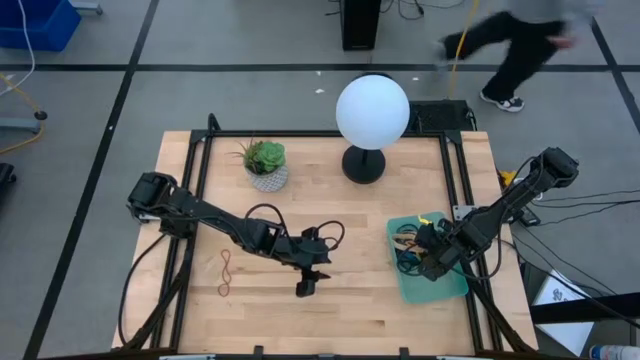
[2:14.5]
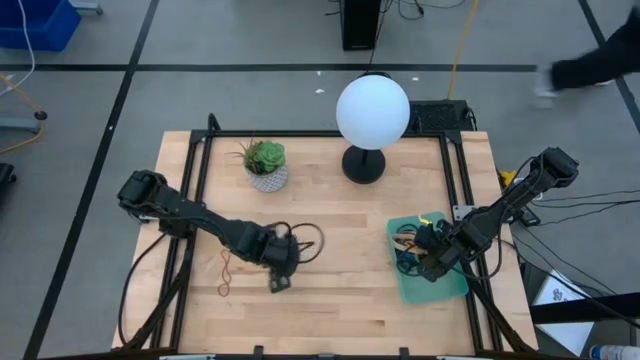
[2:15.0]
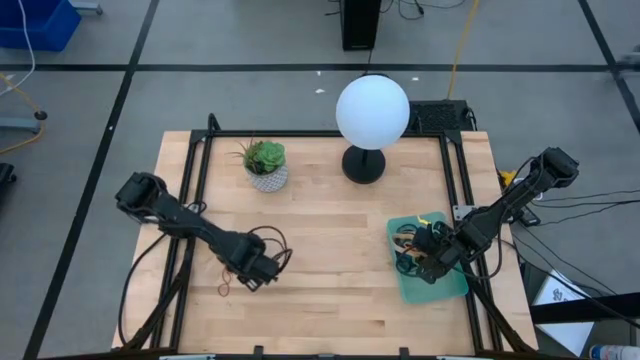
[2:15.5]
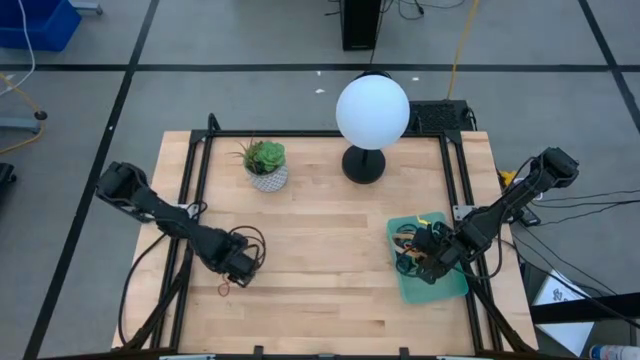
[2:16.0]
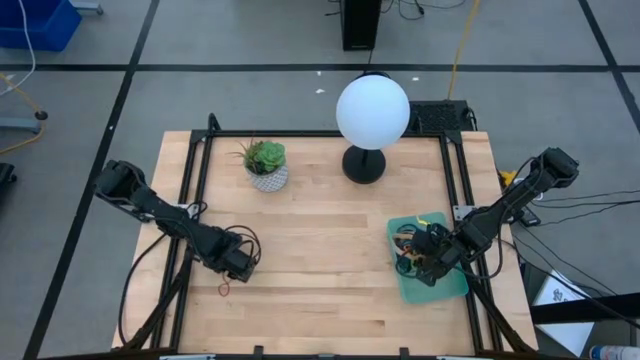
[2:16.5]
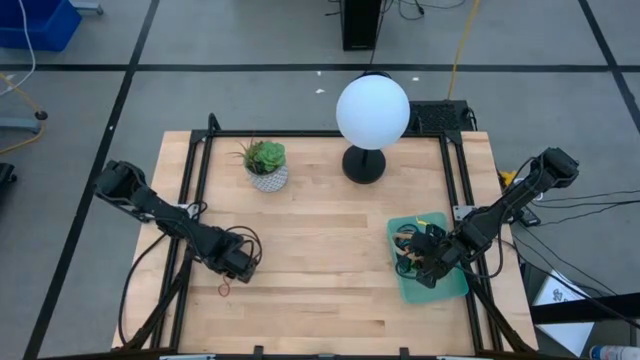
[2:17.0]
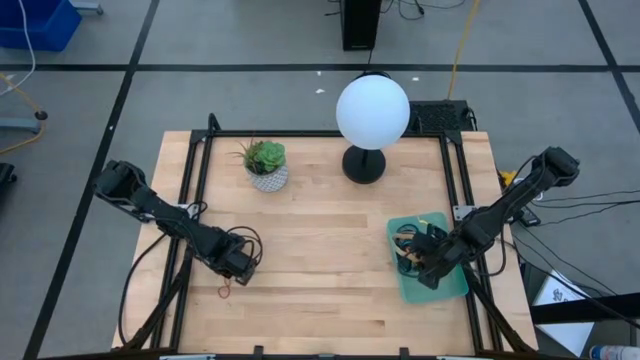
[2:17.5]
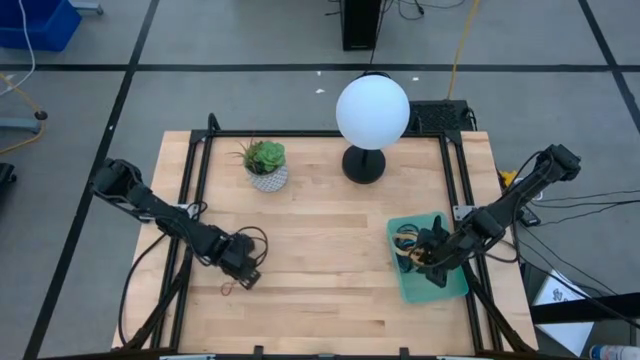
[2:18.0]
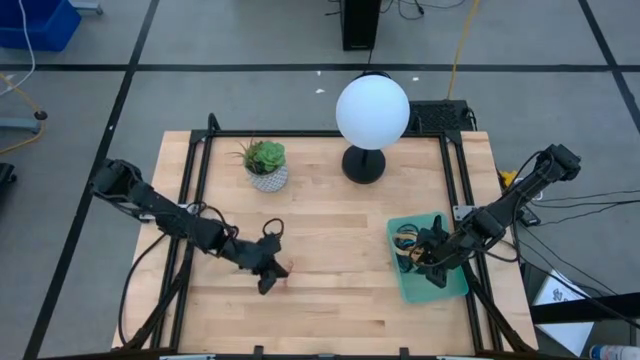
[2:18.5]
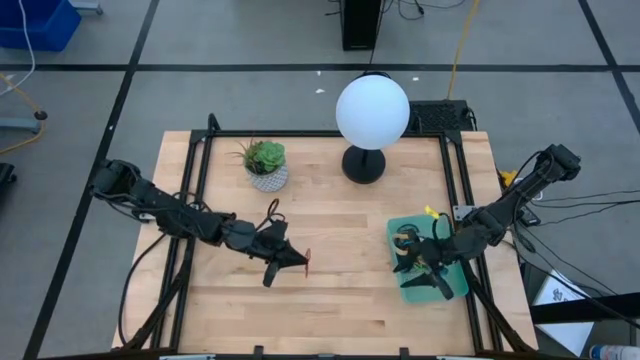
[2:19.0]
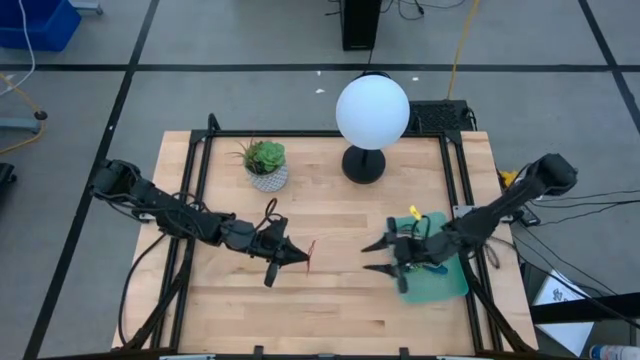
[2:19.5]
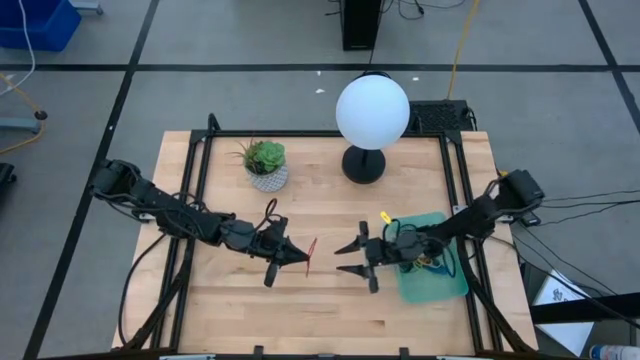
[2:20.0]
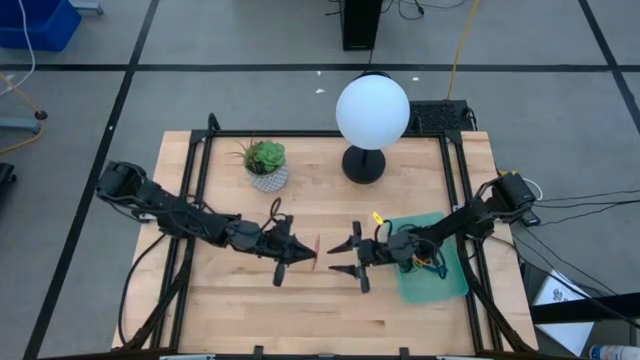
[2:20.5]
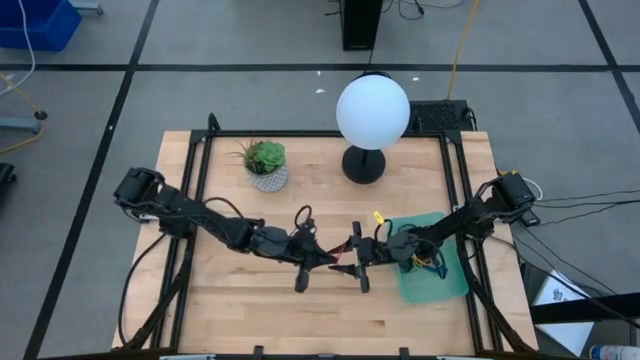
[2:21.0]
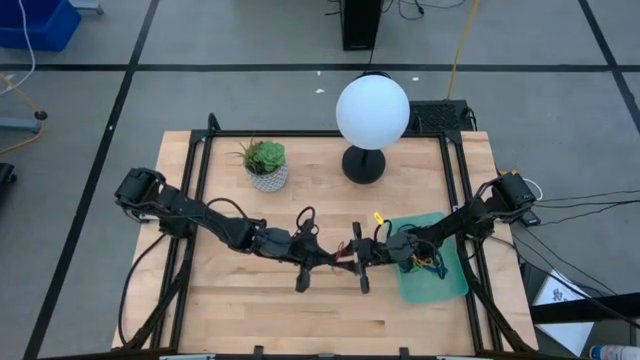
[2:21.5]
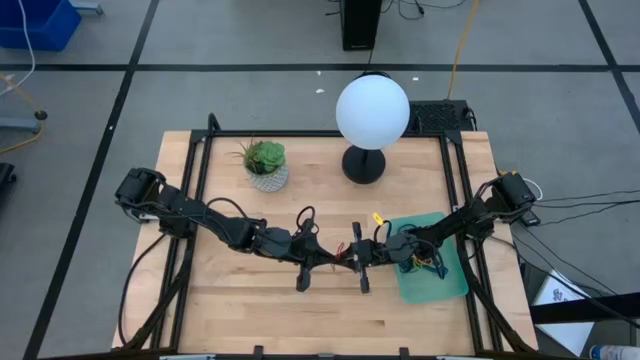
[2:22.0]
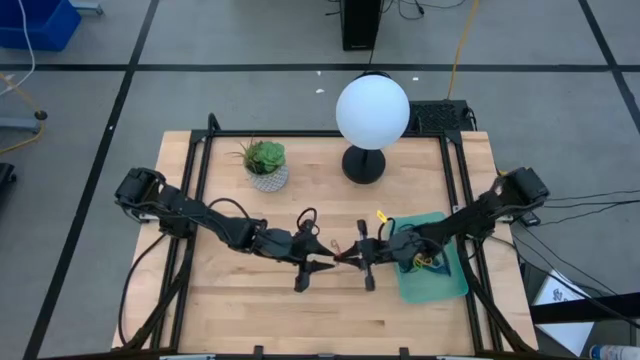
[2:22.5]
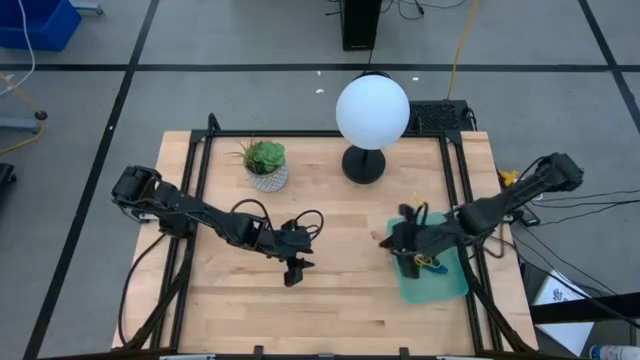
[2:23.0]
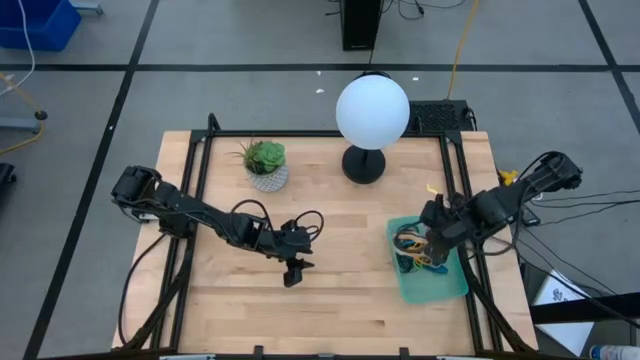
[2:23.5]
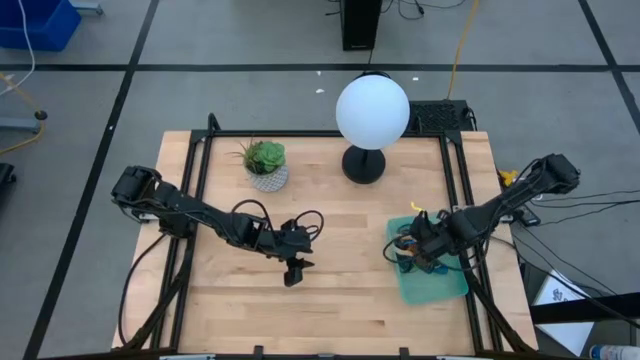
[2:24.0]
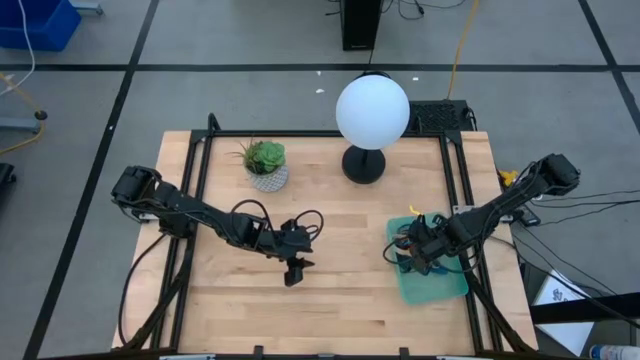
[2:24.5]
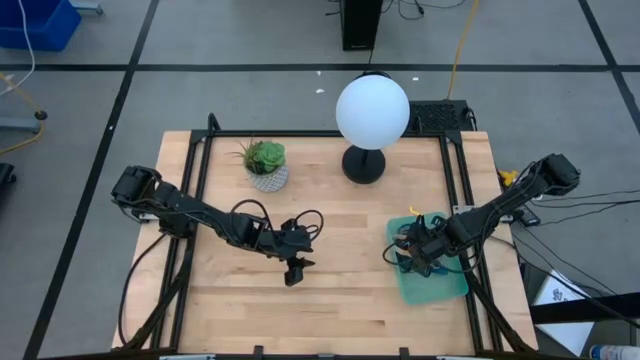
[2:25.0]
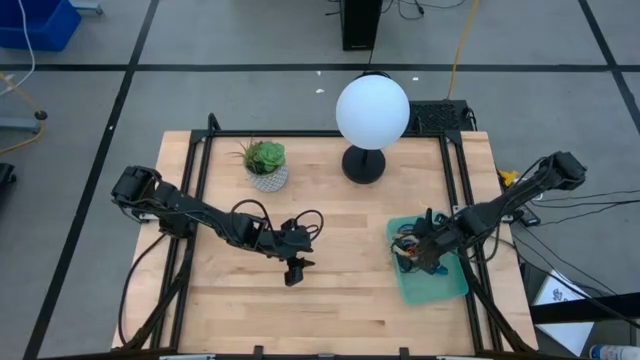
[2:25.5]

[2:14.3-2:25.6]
Task: Pick and place rubber bands into bin
Put the red rubber band into the bin

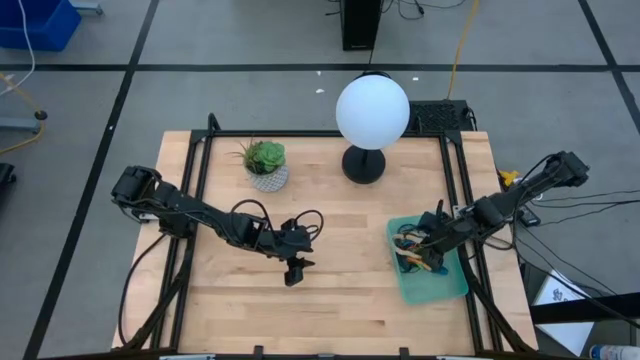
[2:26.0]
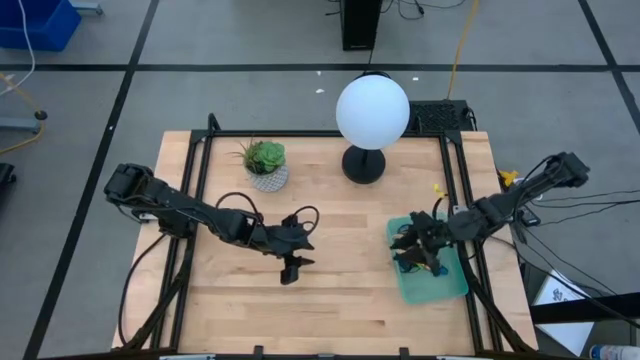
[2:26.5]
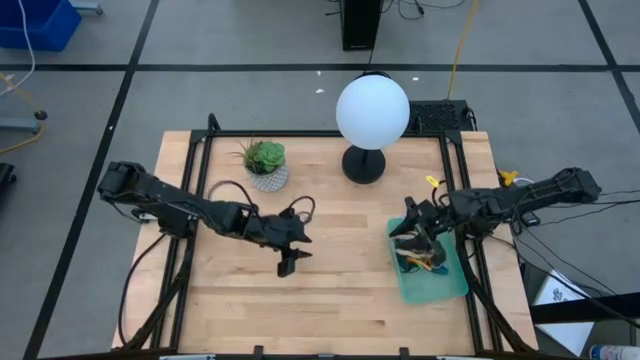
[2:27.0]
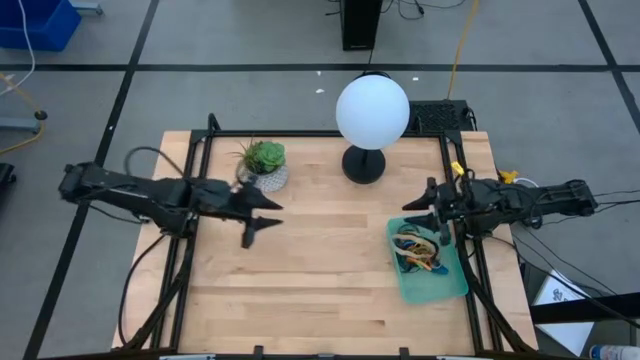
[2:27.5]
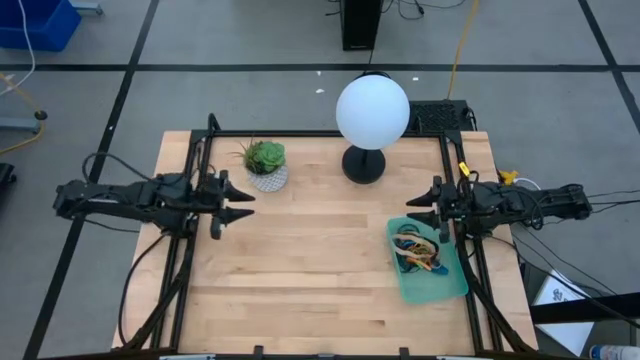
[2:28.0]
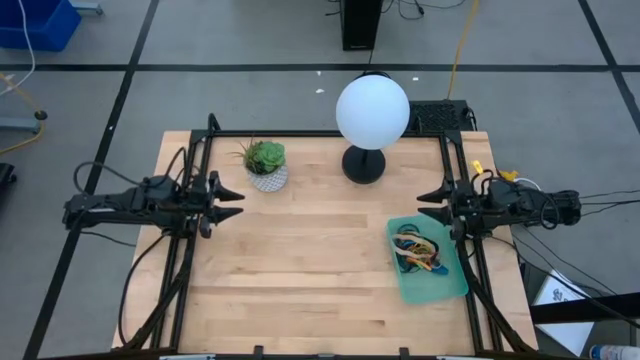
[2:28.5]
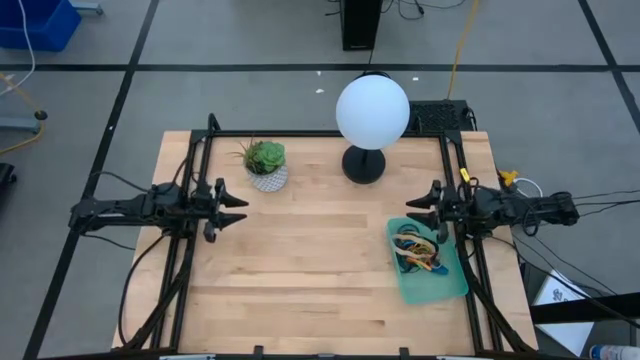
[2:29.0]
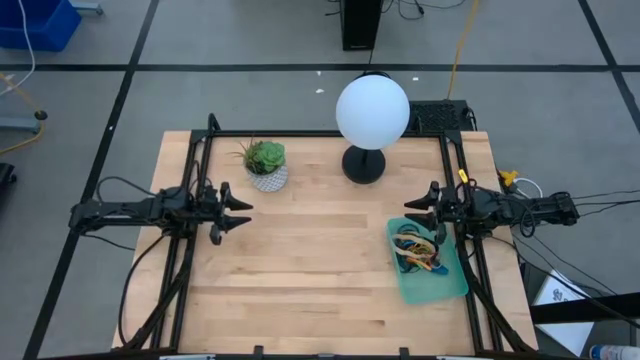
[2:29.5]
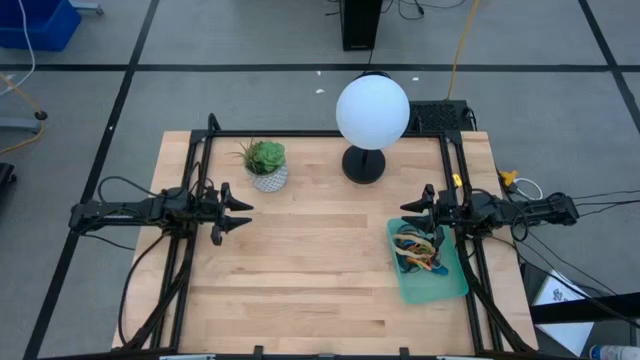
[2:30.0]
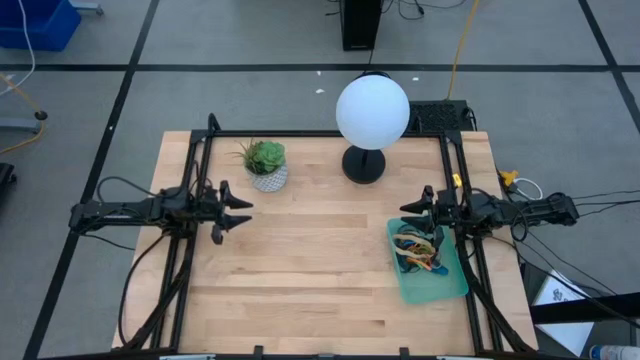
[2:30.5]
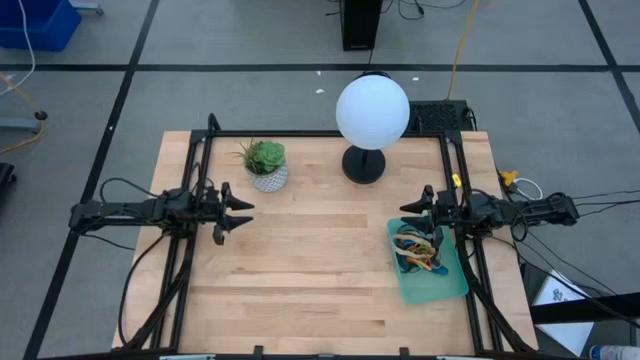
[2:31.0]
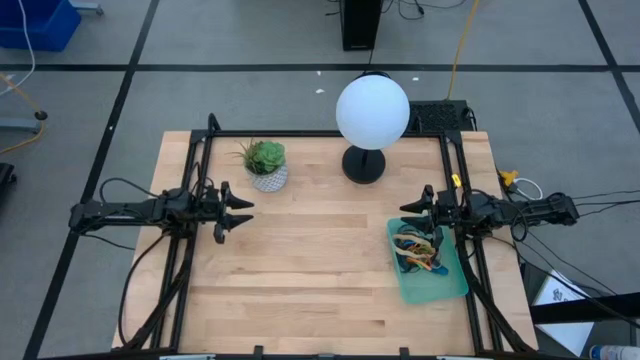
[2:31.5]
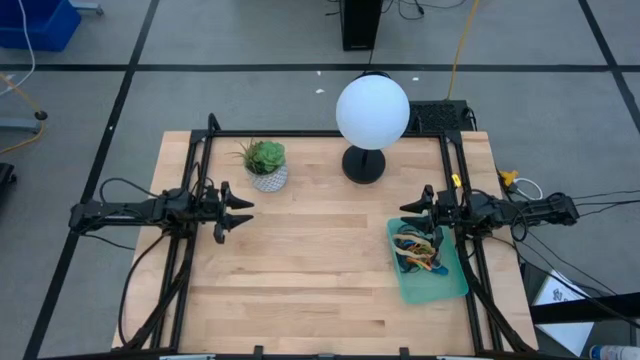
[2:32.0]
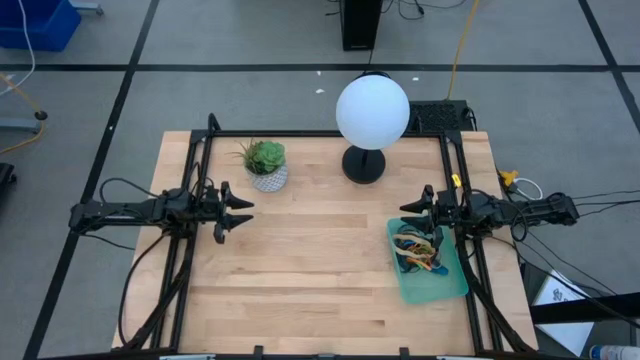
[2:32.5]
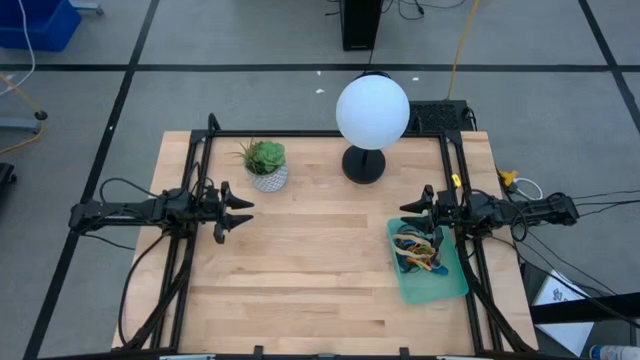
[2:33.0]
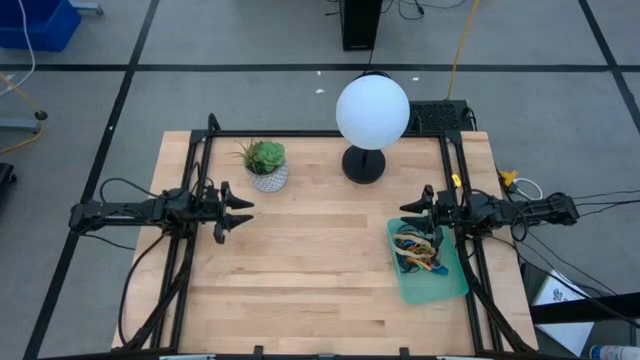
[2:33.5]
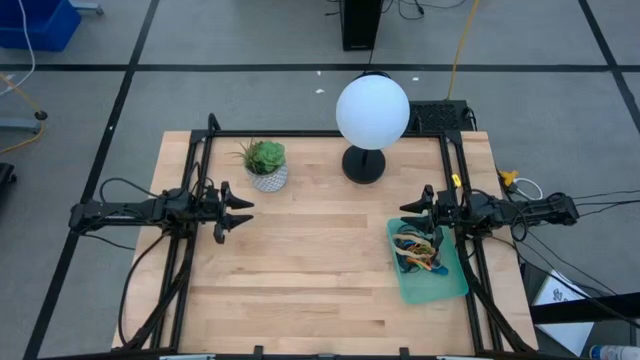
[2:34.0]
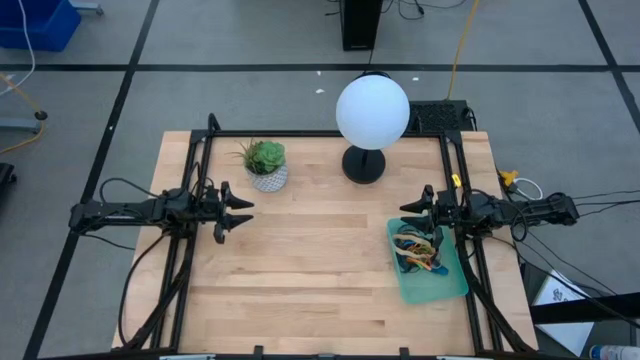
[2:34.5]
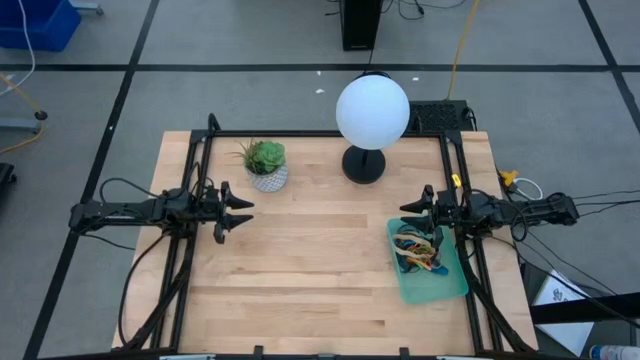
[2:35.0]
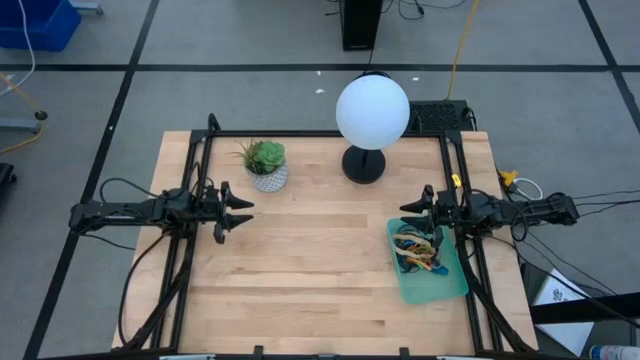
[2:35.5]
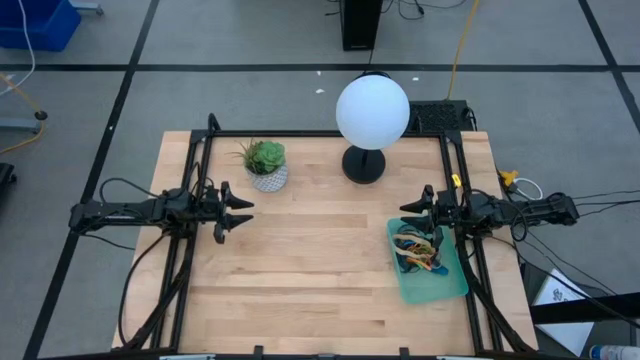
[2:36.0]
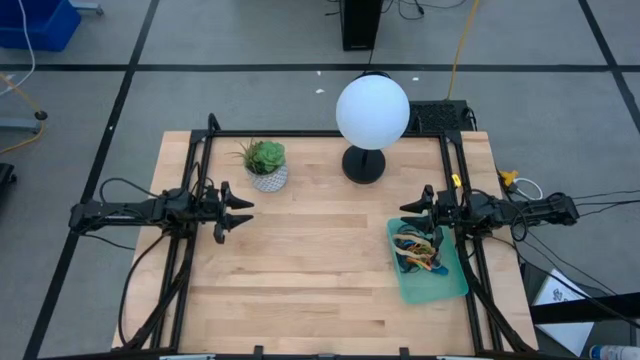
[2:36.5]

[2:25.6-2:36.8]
Return to Home Position
